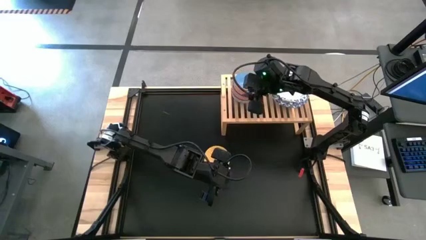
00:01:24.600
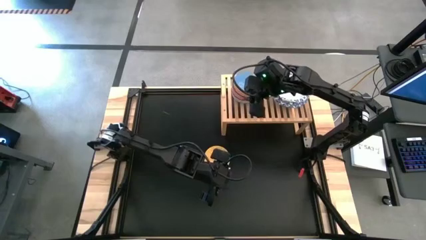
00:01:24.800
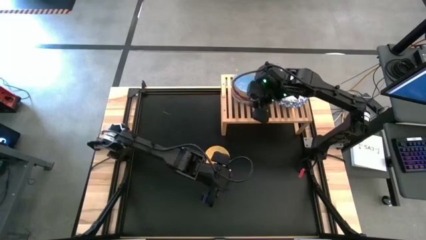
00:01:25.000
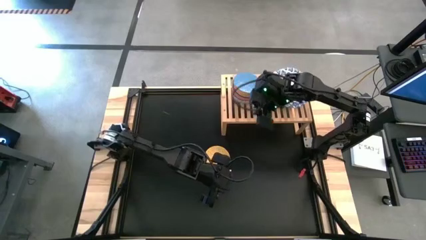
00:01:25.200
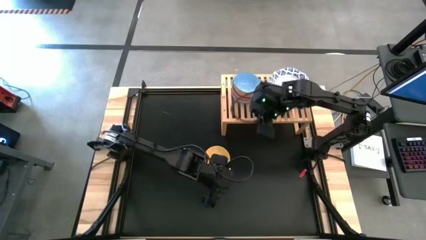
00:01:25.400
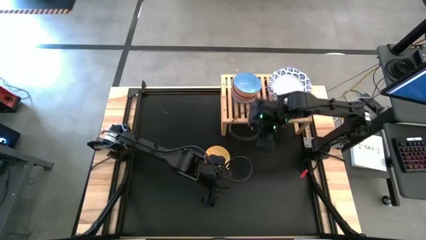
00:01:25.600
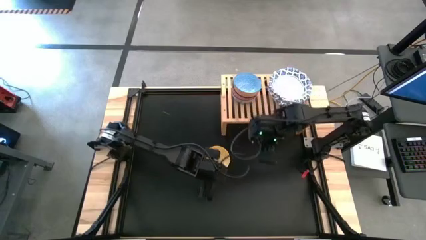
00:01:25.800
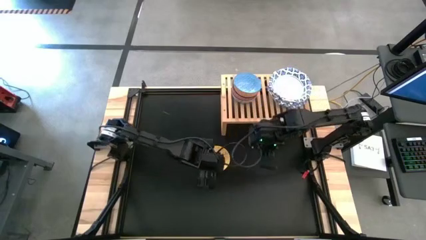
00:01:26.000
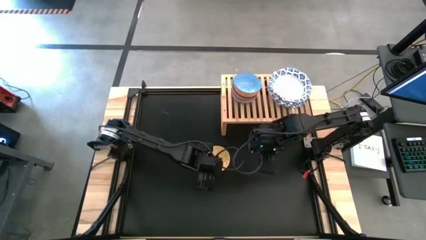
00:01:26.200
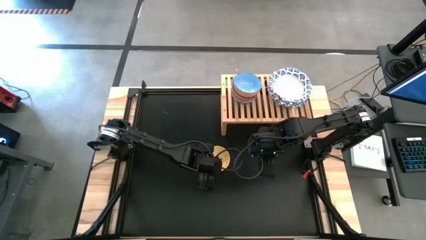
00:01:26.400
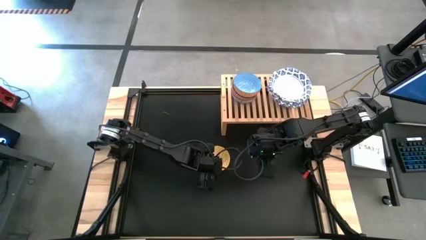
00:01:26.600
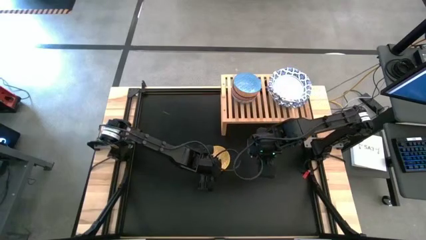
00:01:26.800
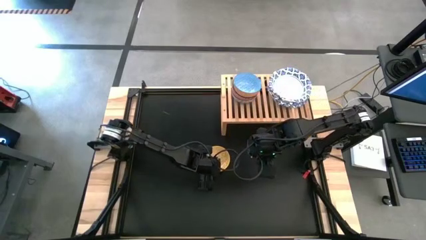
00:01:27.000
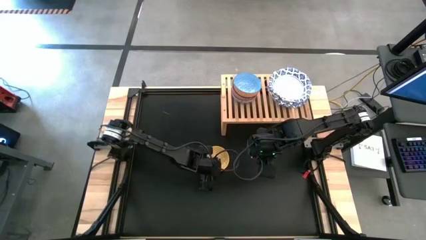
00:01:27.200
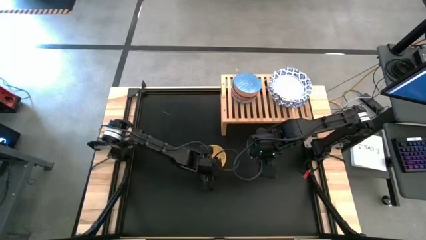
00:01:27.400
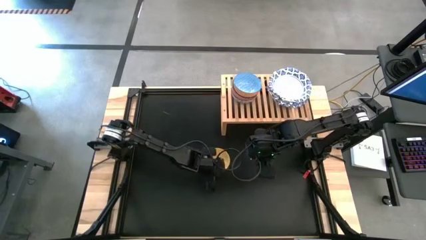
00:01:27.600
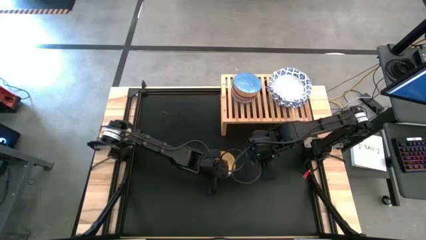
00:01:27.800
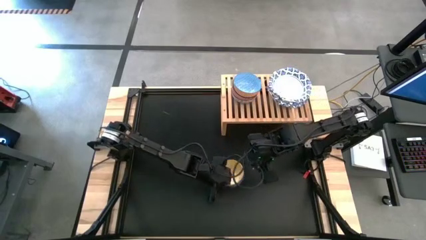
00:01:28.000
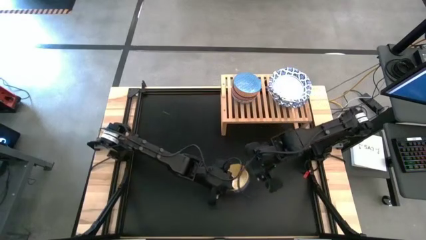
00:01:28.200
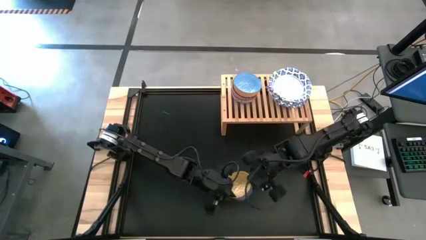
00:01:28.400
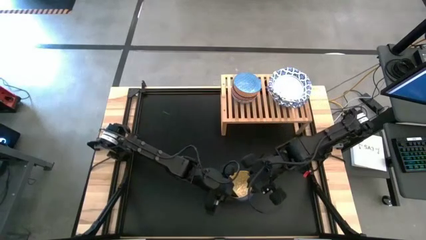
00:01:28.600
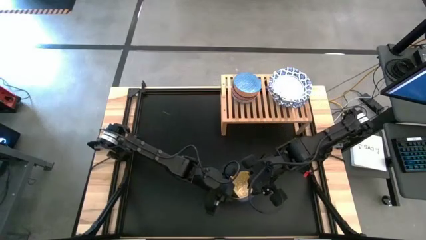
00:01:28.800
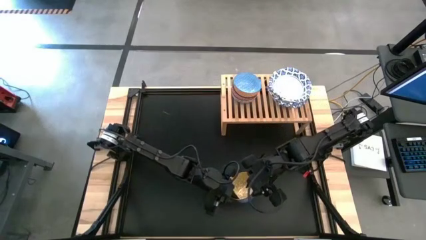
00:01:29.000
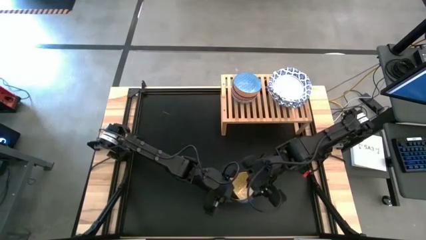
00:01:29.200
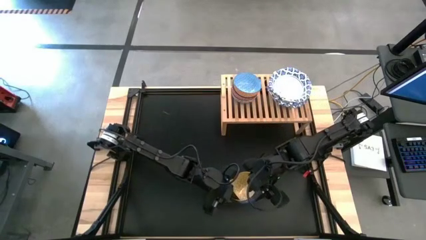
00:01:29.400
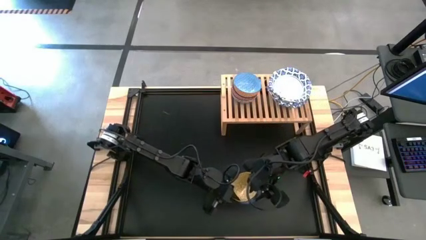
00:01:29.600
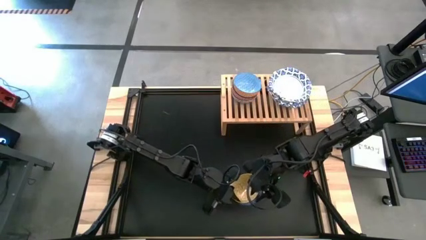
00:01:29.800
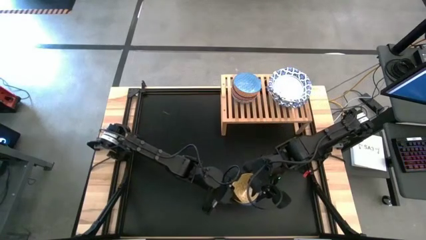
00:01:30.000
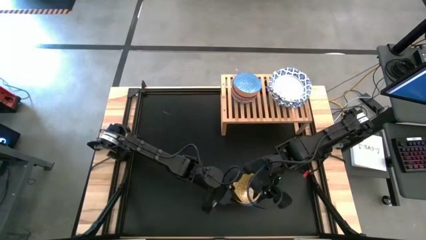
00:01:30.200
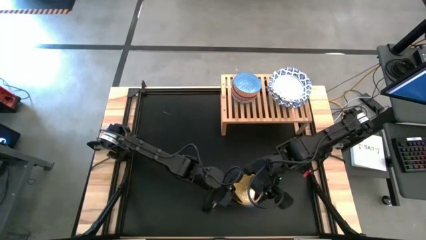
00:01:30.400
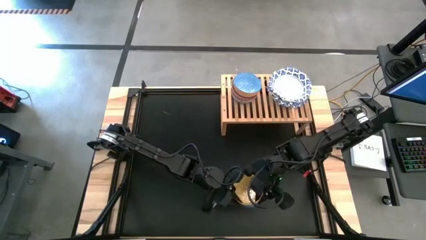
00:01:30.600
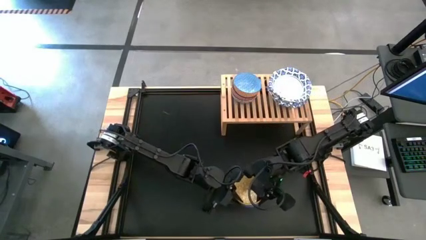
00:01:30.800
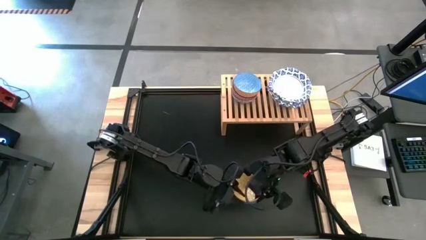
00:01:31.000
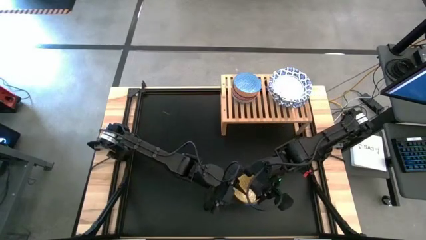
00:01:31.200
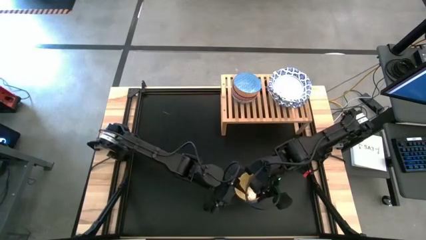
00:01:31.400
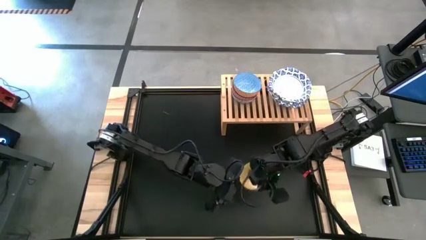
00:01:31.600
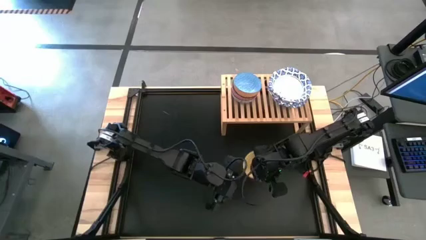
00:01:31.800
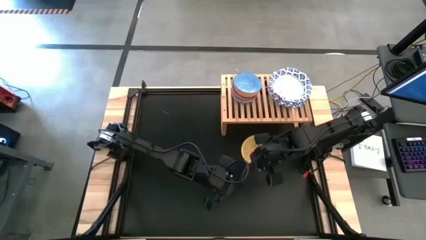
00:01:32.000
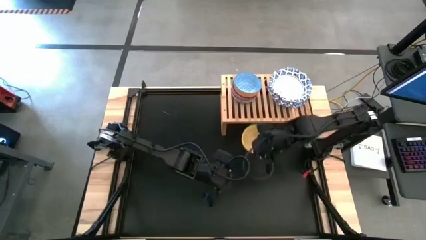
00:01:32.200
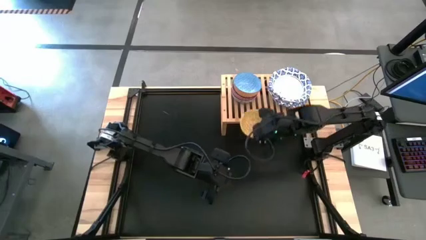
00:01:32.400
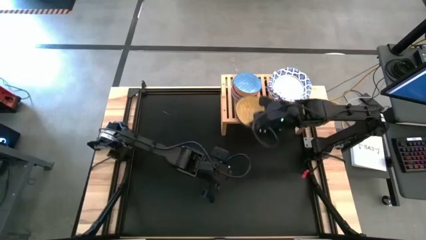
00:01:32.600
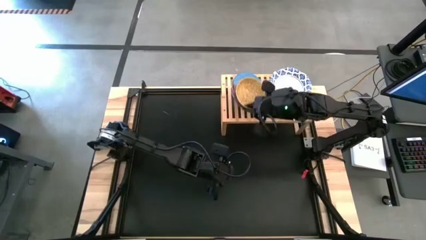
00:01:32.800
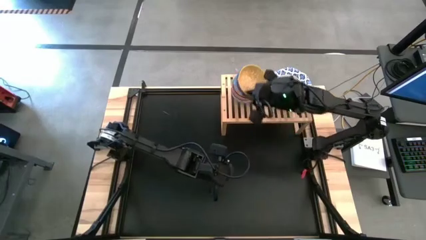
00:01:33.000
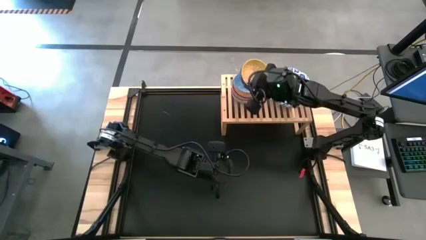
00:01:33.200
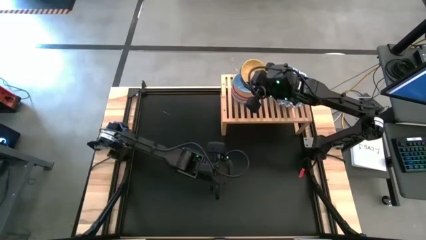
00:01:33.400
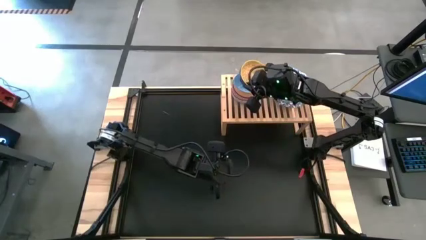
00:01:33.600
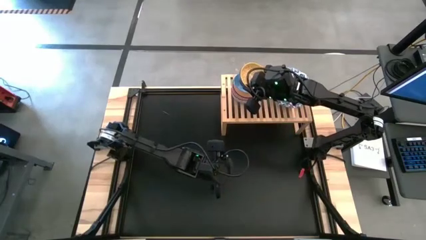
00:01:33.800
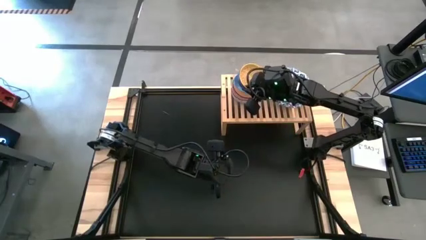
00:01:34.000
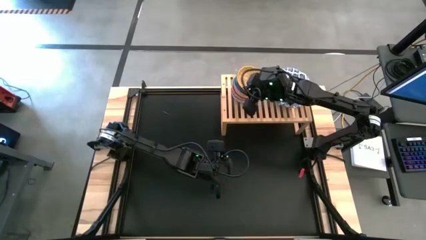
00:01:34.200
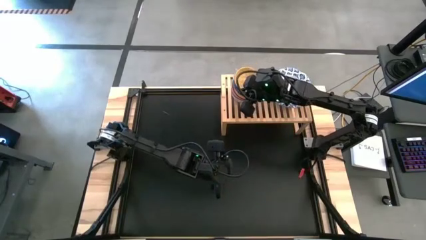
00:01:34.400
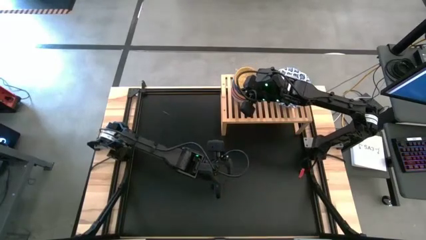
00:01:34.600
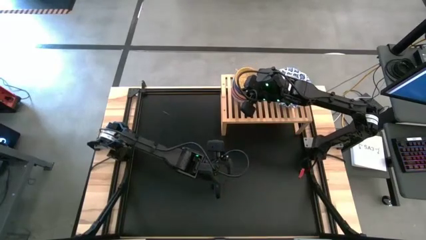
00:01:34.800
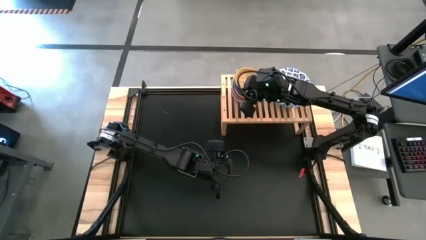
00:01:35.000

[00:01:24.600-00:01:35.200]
Task: Place and stack bowls onto a shelf
Stack the yellow patterned bowl on top of the light blue patterned bowl on the shelf

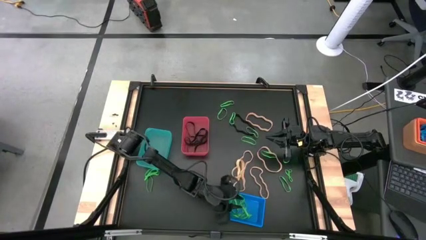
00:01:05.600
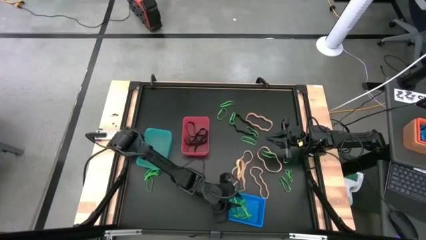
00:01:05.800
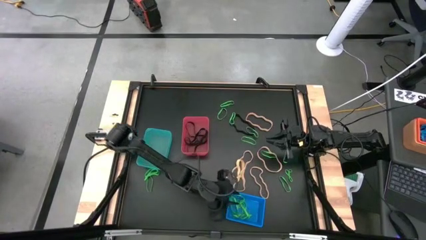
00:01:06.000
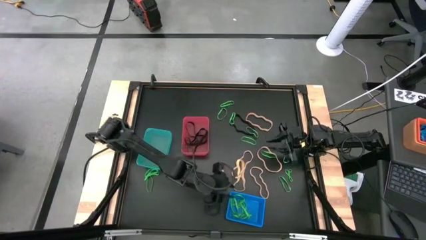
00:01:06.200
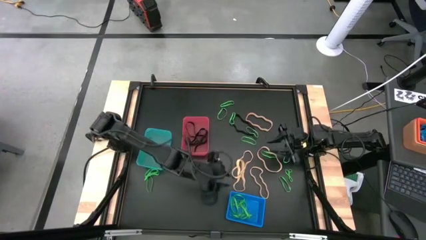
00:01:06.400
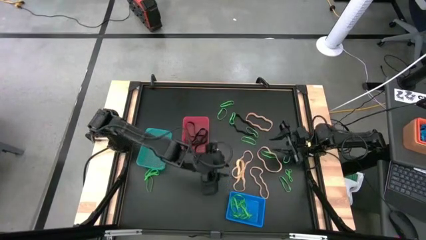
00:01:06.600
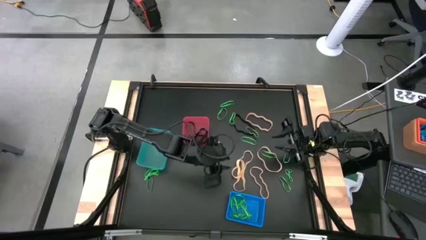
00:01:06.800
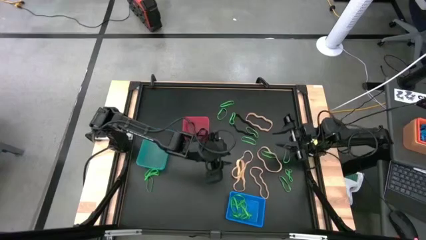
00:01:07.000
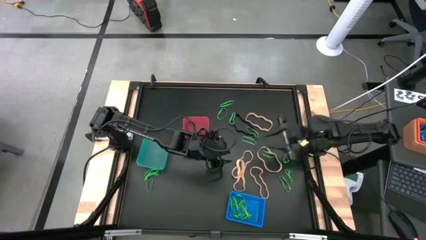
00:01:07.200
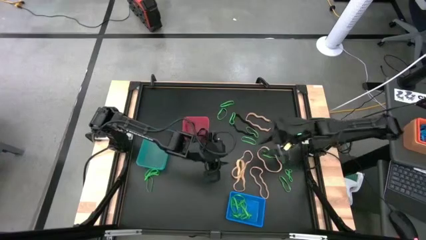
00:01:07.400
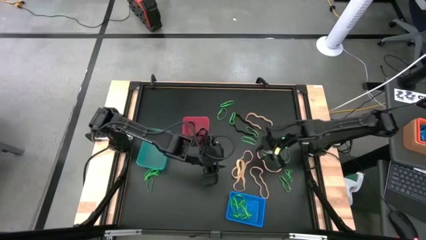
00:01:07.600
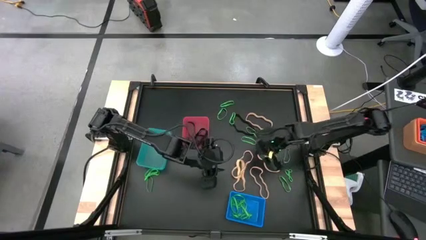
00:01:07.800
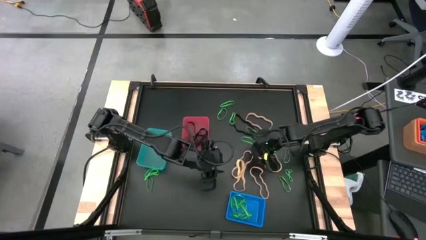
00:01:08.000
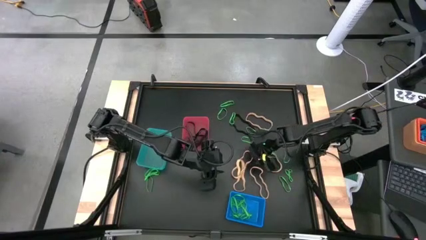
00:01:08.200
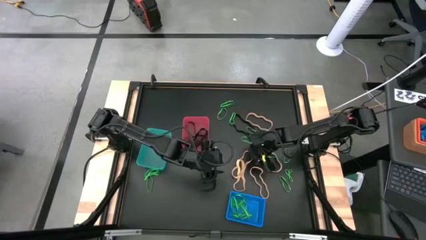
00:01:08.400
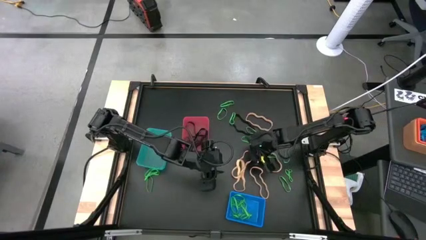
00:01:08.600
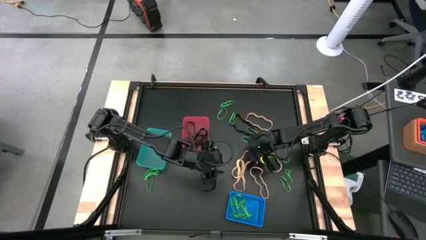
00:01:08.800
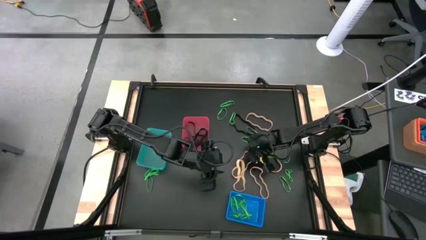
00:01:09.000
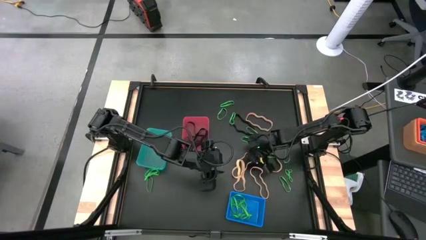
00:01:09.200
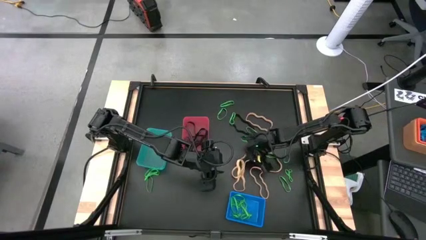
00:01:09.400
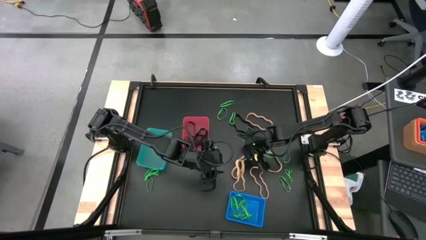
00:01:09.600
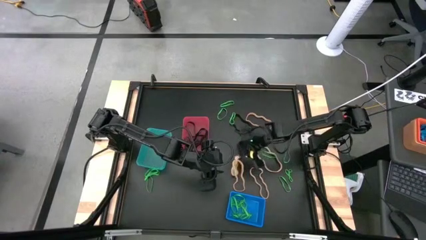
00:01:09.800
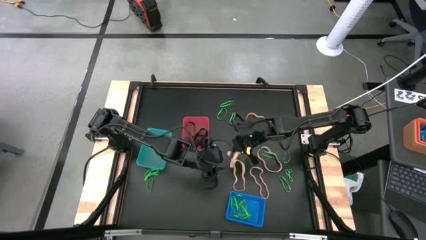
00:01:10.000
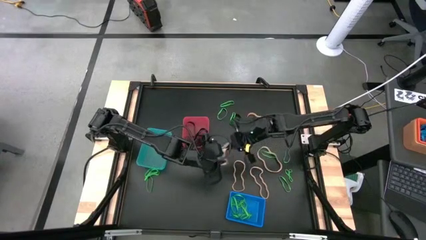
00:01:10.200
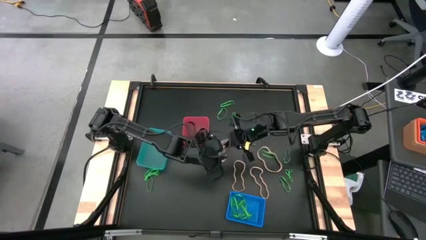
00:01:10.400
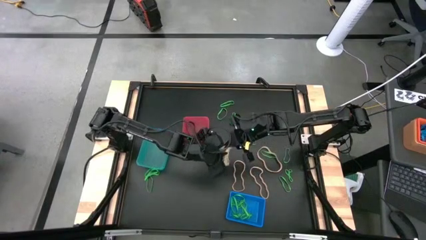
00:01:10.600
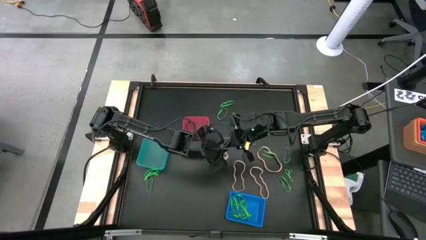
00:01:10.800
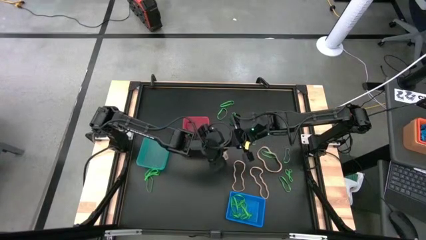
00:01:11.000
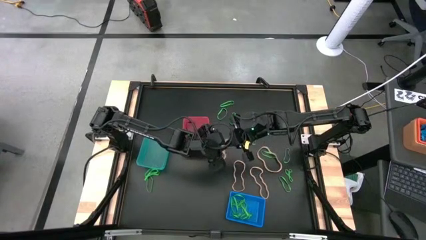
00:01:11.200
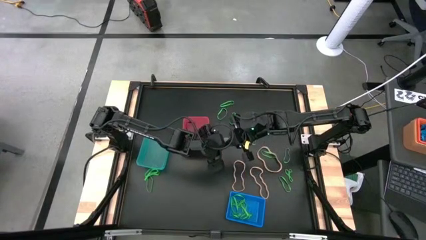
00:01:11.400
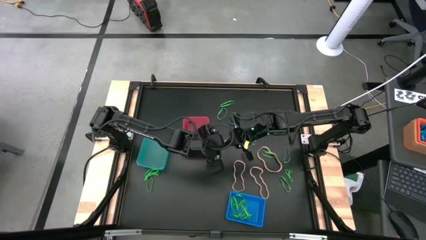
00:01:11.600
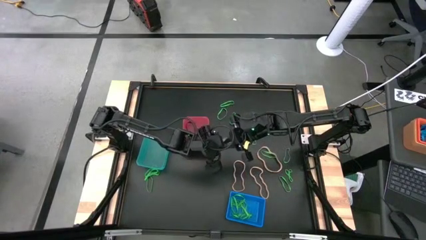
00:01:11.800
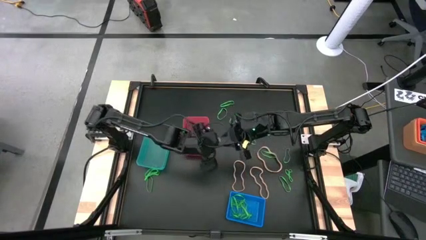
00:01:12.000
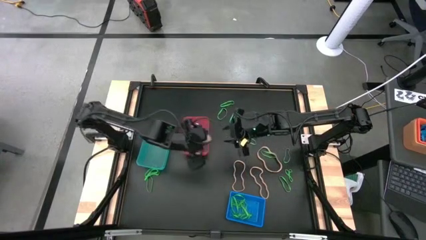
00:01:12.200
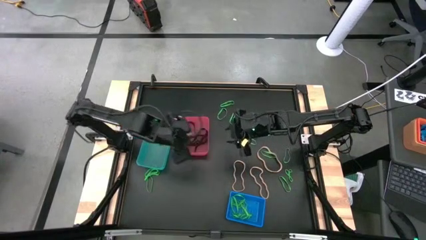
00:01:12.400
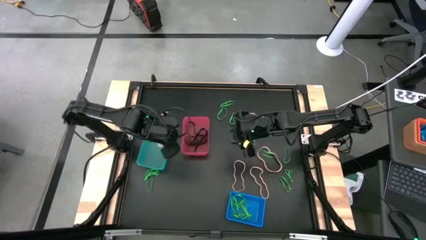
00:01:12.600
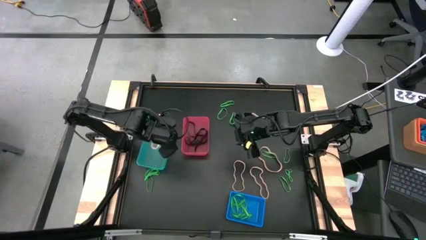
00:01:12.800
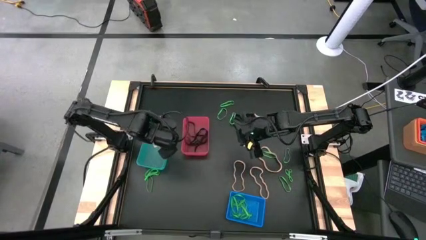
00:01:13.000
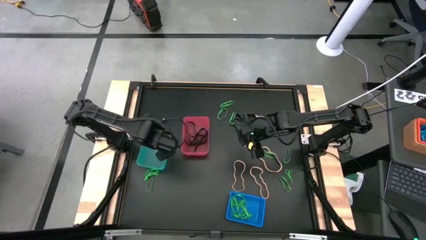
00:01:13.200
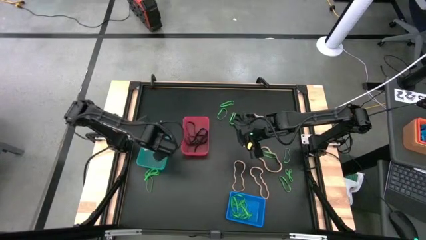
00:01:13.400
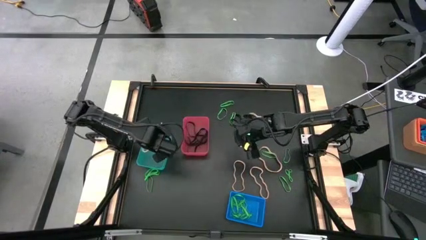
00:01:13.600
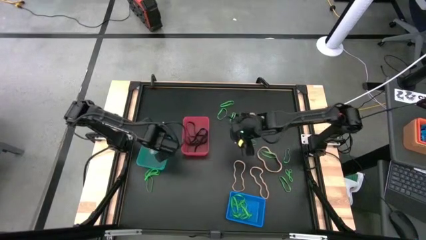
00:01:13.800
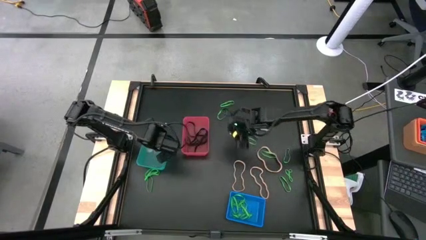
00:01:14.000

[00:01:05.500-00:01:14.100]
Task: Sort rubber bands into baskets
Put the light yellow rubber band into the light blue bin
